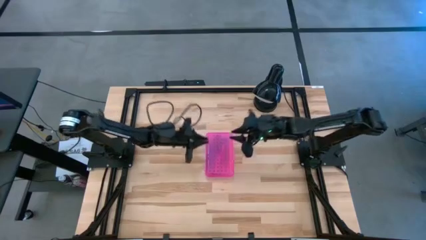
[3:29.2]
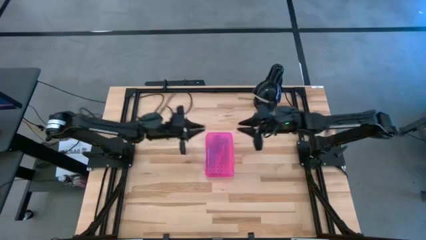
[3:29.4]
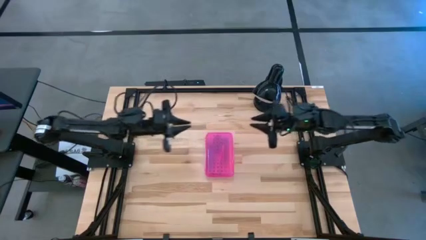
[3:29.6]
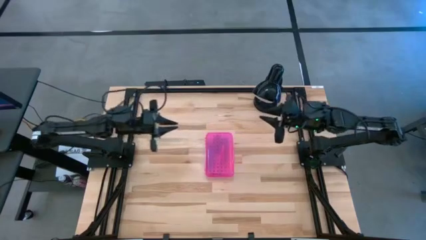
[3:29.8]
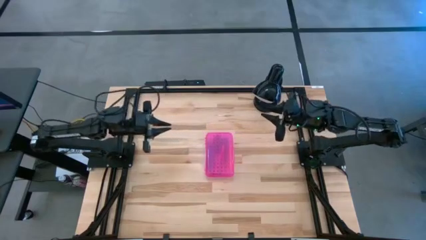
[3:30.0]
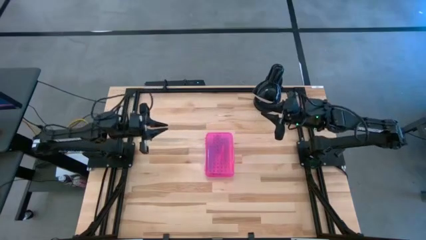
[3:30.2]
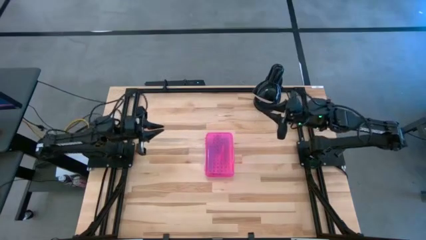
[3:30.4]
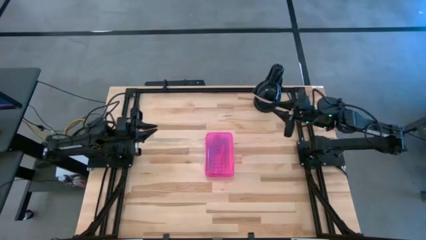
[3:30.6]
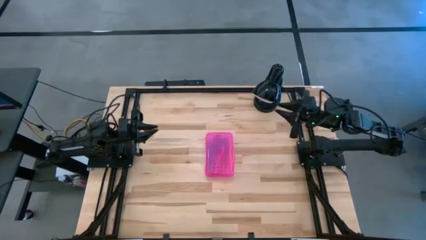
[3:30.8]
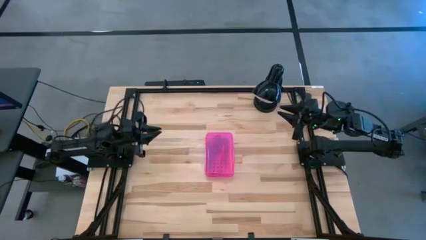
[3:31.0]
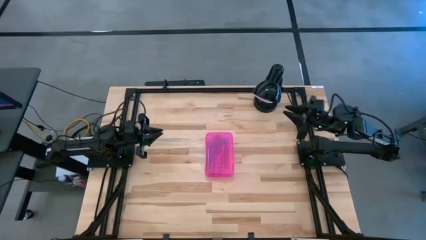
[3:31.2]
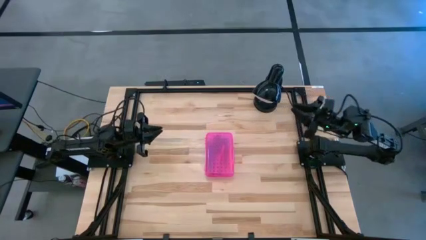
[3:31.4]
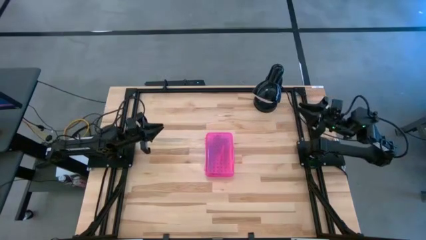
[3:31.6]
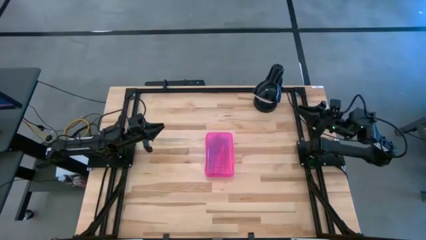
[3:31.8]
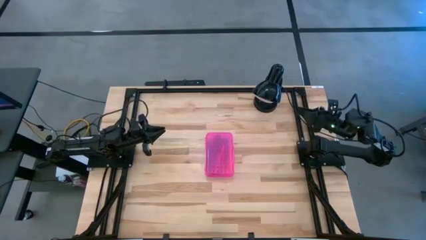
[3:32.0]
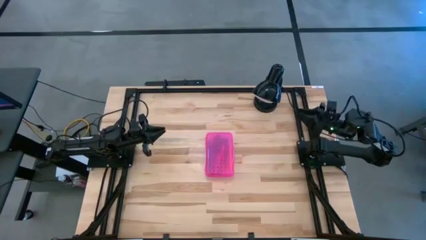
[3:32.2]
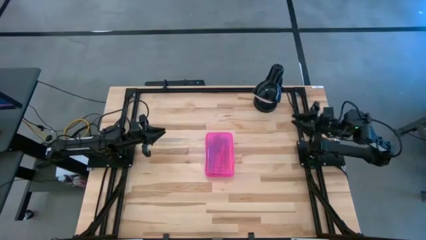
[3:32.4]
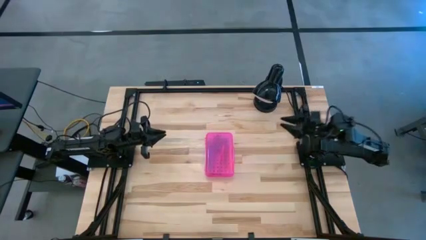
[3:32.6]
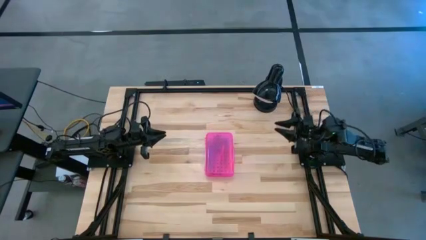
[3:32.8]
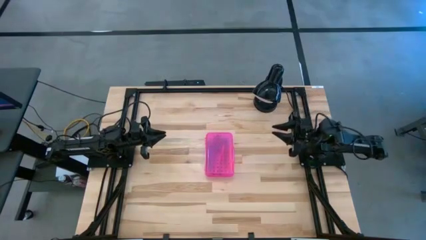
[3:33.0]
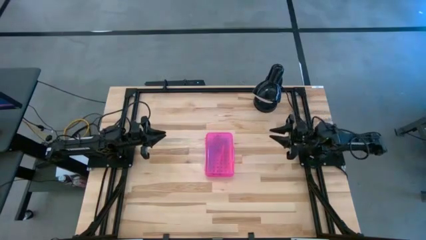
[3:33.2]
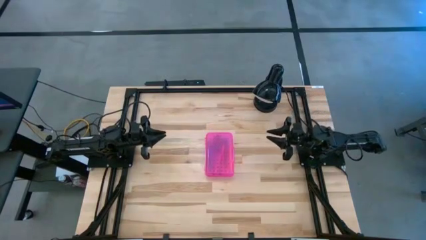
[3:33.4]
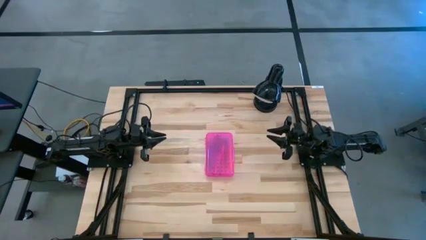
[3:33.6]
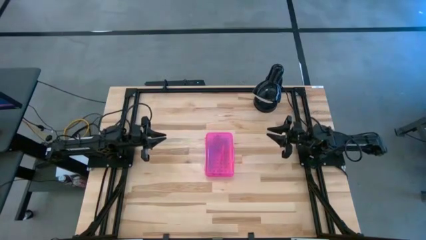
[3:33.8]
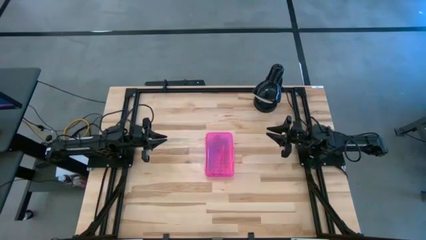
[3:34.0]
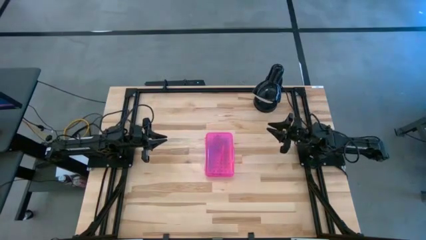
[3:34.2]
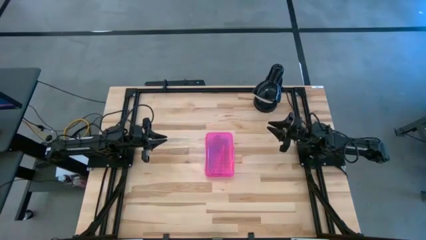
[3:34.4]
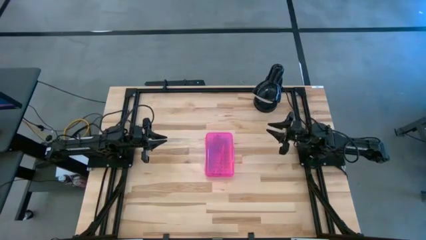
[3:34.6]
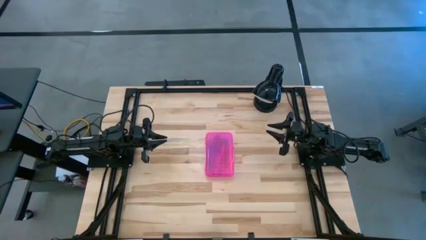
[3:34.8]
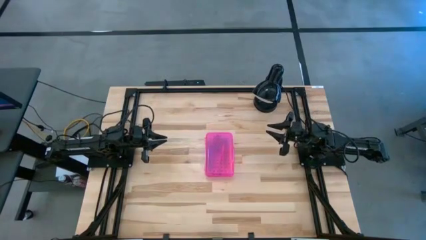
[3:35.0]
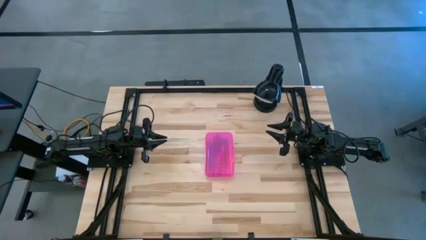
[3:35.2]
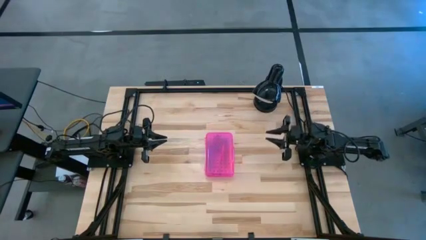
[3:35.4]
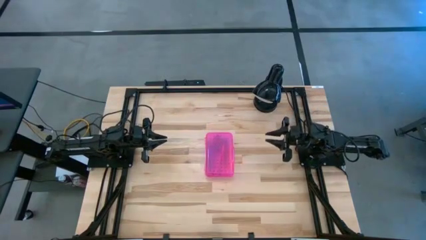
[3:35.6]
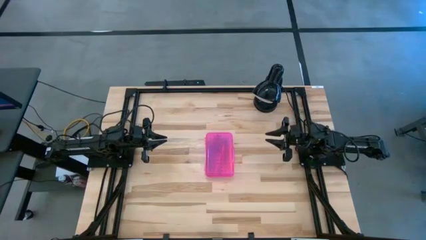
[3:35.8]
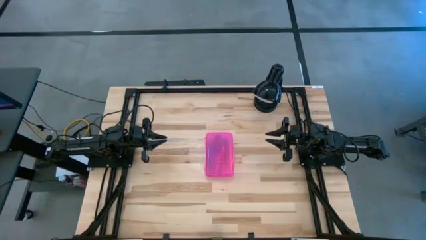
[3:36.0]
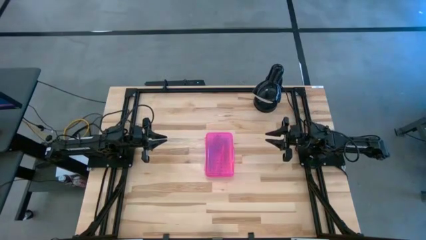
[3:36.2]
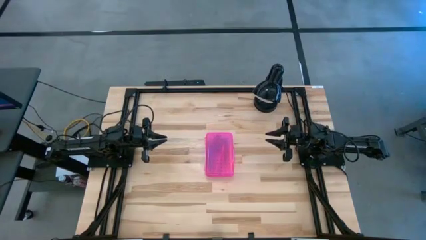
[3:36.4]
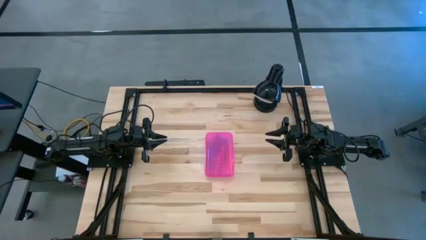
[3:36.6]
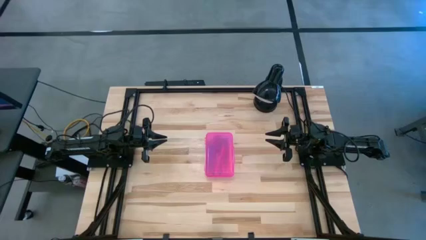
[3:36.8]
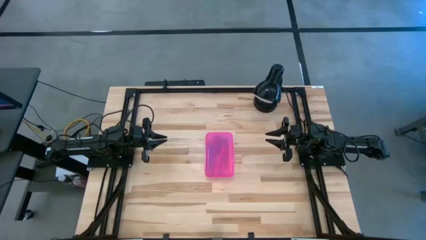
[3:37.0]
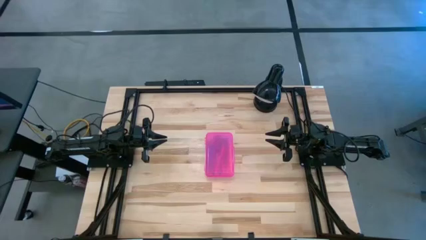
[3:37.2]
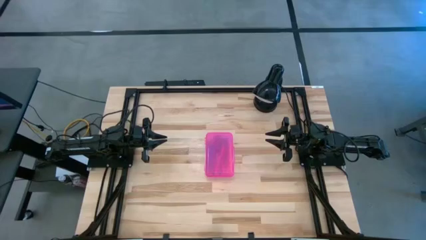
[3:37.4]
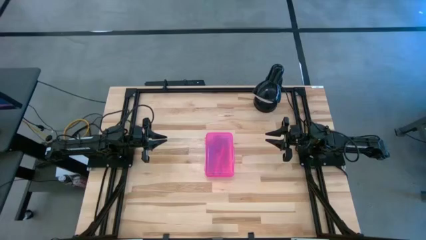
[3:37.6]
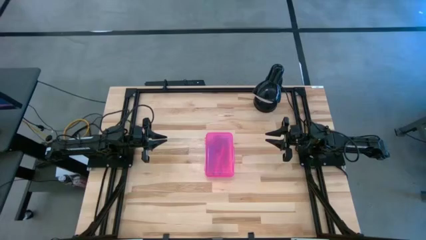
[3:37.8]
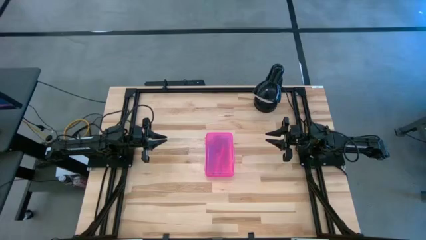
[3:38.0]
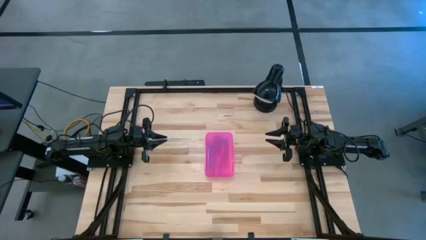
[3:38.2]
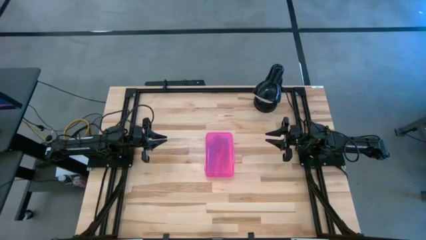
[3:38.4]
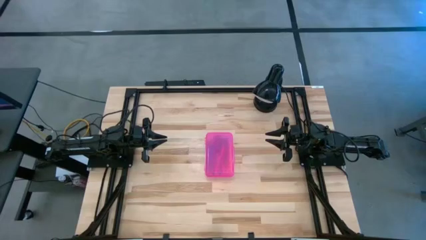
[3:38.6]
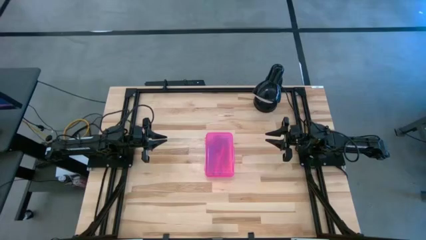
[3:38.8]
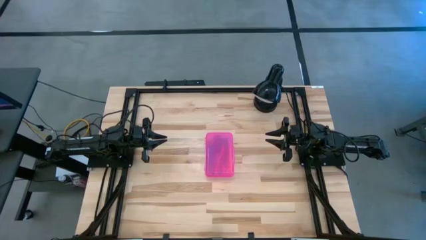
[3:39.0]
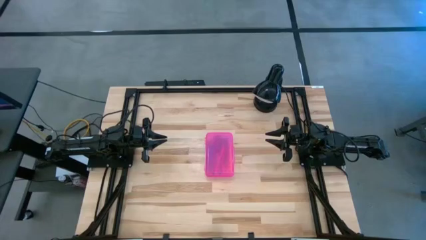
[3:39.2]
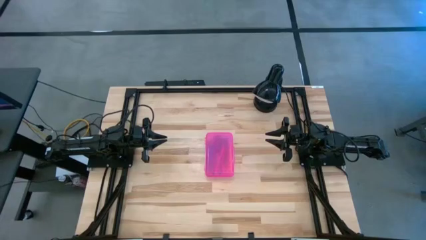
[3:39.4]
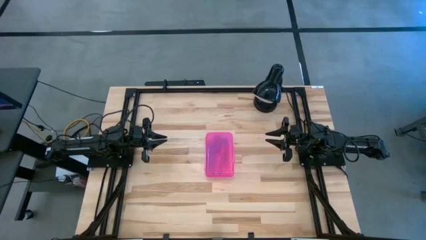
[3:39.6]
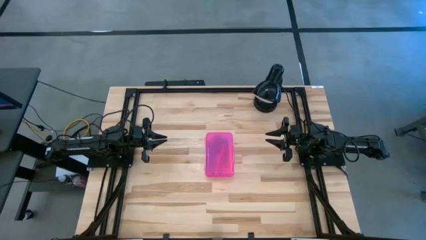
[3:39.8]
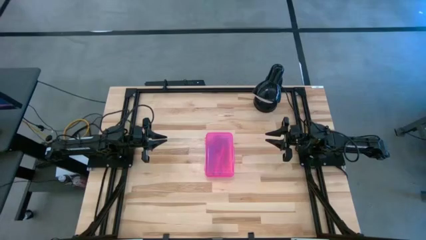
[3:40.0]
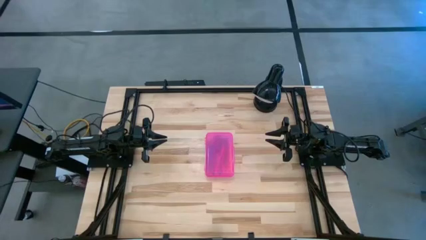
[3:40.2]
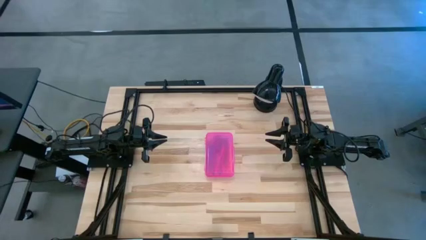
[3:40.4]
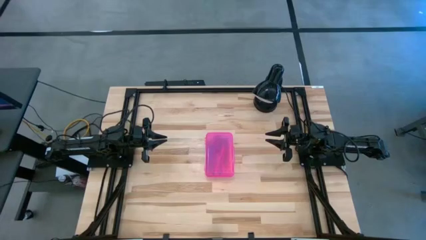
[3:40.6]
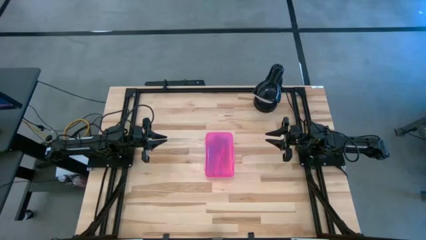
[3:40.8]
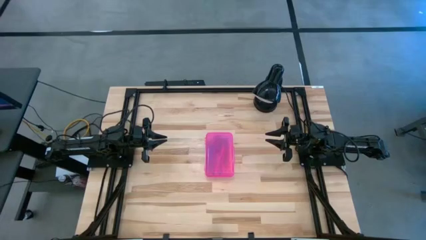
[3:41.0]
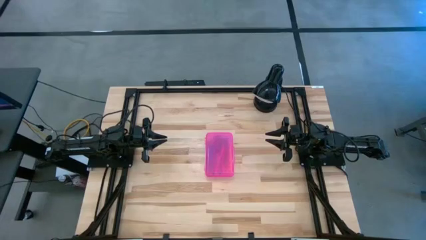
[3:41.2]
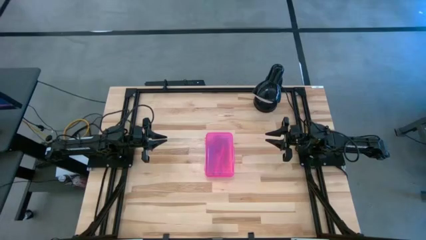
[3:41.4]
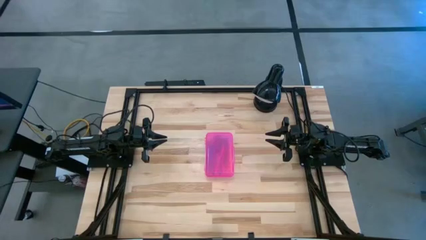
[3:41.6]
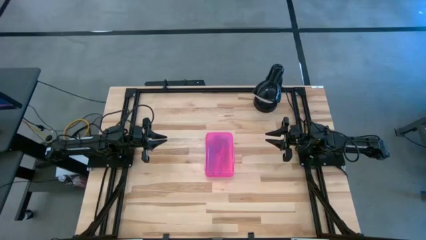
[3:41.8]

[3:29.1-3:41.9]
Task: Pick & place school supplies into a supply box
Return to Home Position

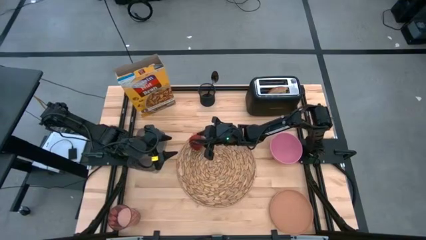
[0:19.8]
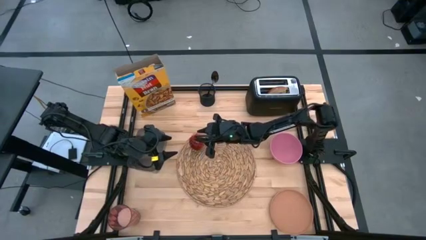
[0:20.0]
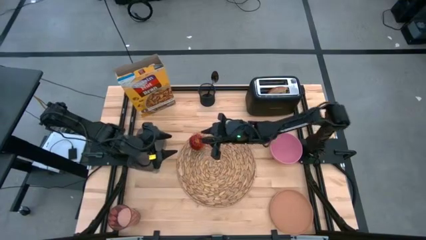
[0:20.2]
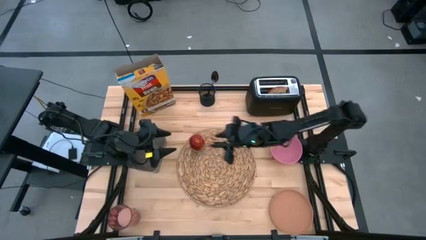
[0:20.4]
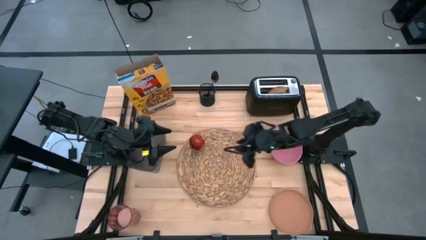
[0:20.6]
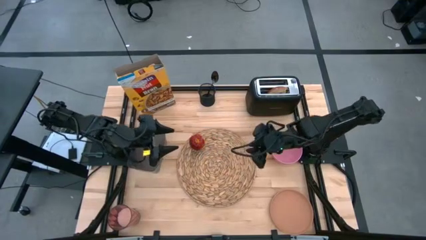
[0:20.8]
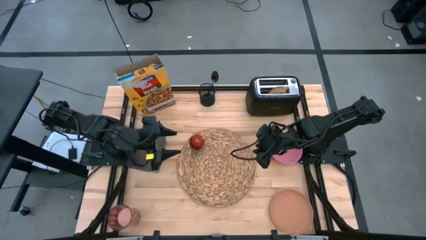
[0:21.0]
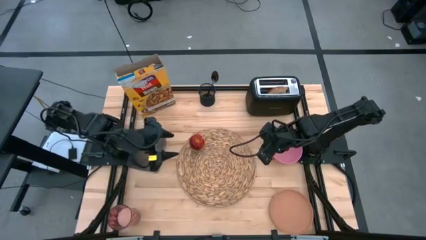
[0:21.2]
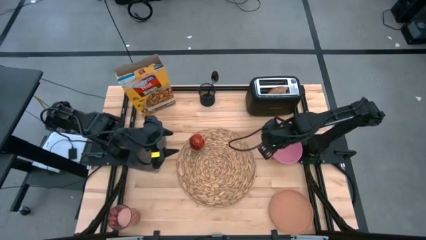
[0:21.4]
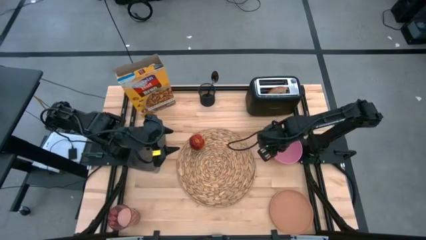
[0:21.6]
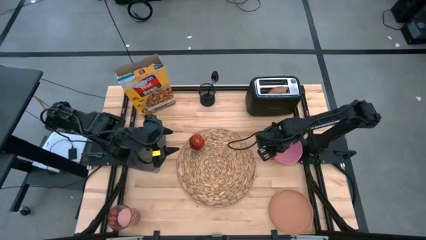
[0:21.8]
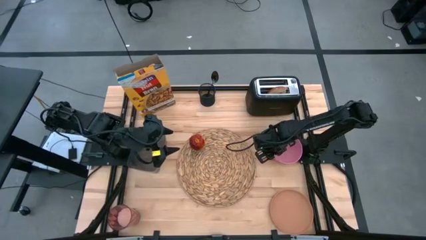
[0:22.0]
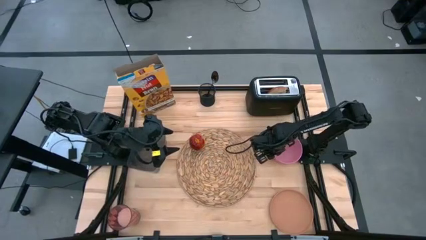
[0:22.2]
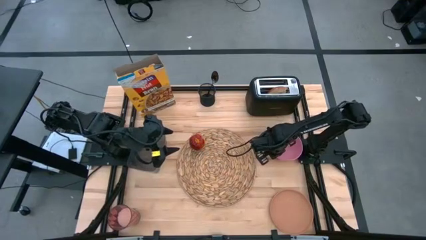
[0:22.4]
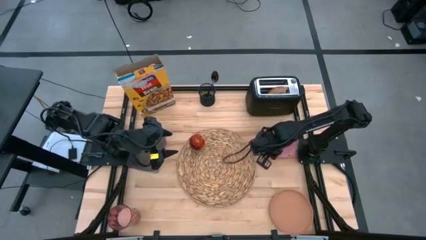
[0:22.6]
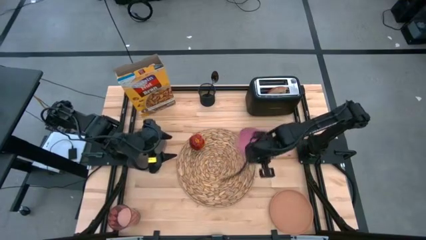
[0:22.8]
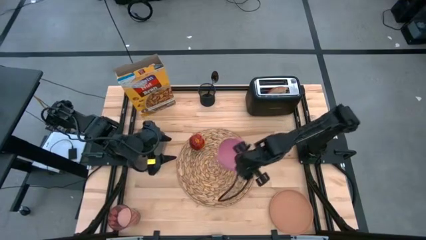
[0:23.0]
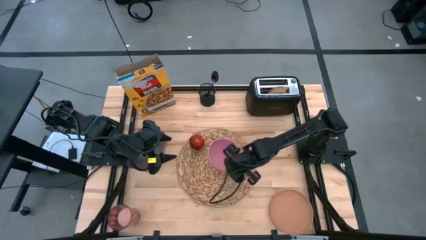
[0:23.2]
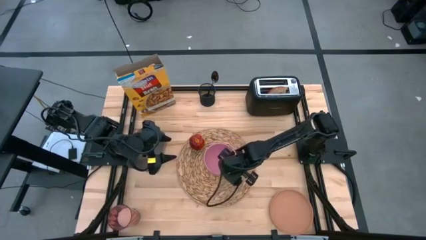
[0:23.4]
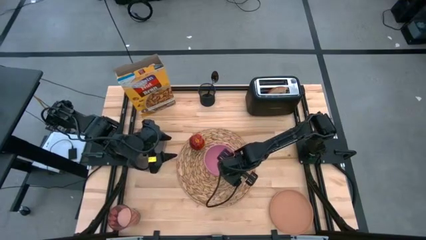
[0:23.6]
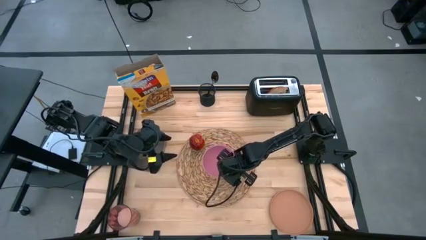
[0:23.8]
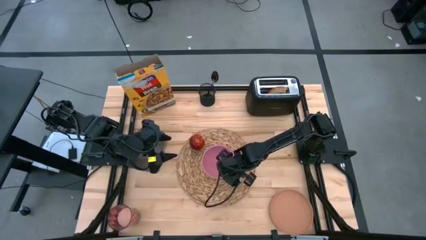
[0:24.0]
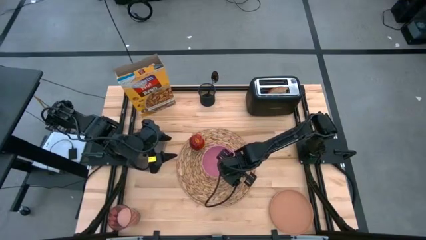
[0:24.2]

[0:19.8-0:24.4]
Task: Arrange a breakfast setting
Put the pink bowl on the brown placemat
